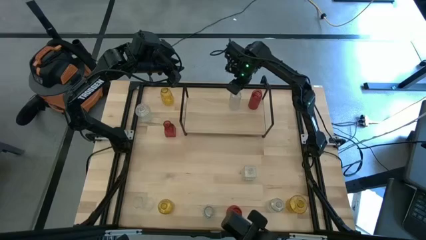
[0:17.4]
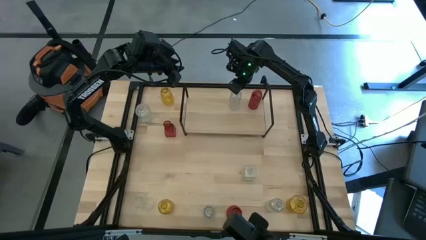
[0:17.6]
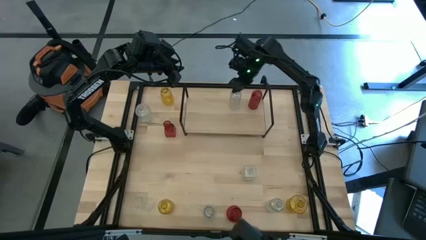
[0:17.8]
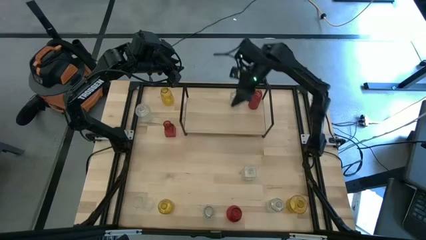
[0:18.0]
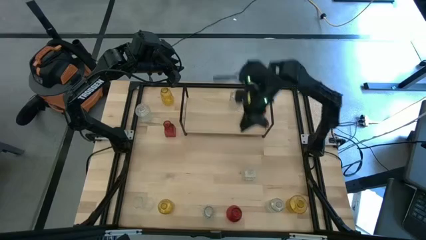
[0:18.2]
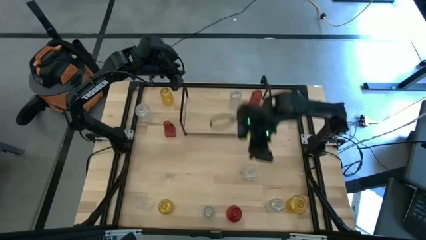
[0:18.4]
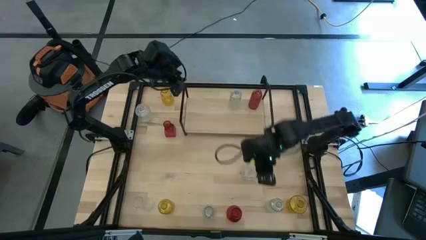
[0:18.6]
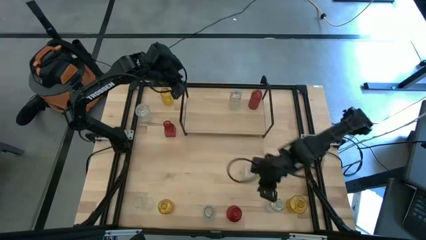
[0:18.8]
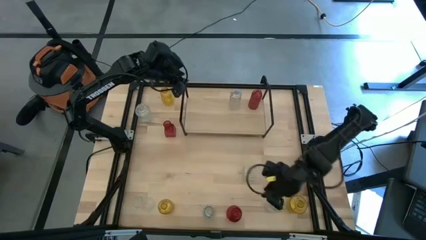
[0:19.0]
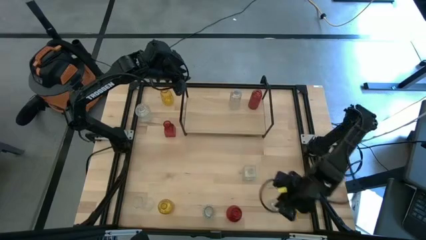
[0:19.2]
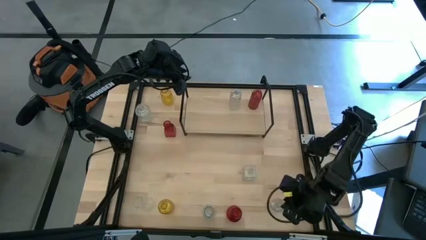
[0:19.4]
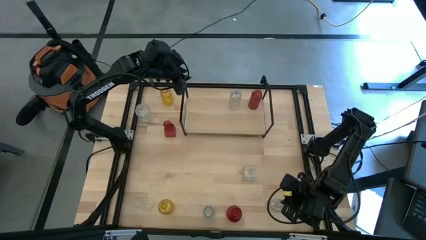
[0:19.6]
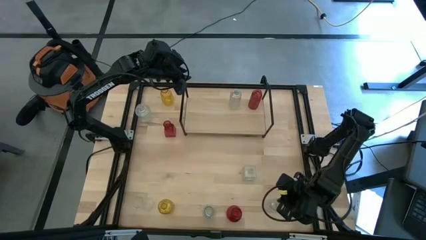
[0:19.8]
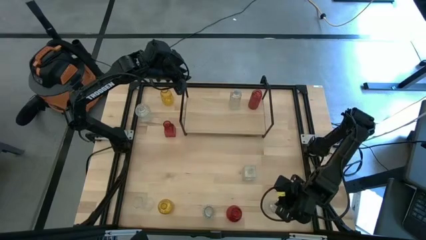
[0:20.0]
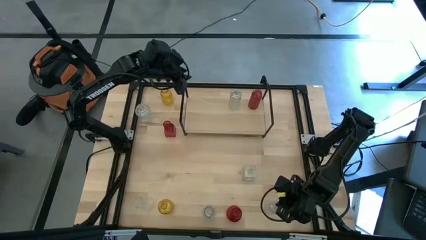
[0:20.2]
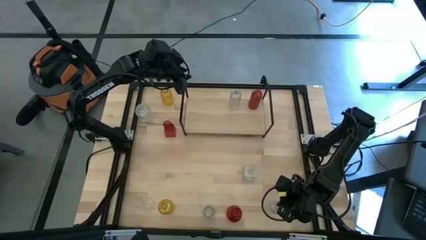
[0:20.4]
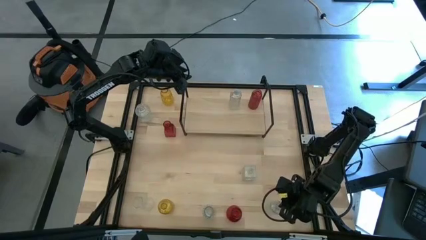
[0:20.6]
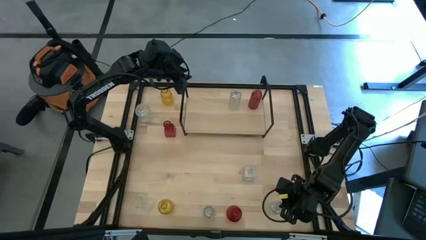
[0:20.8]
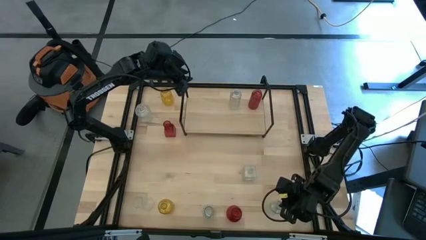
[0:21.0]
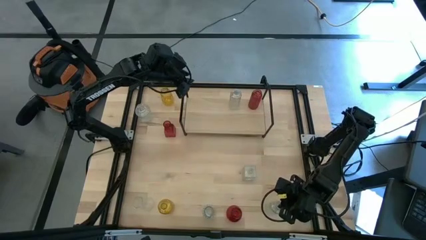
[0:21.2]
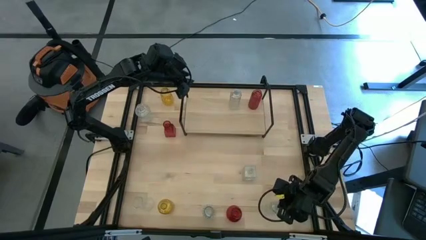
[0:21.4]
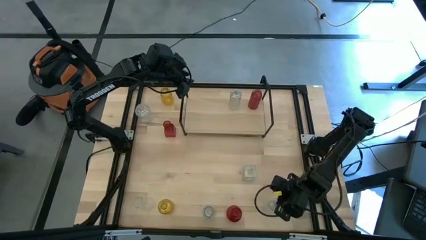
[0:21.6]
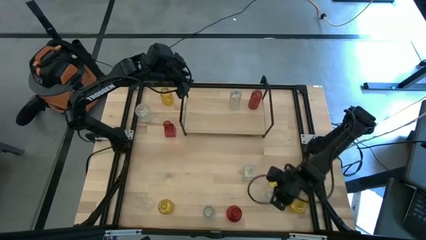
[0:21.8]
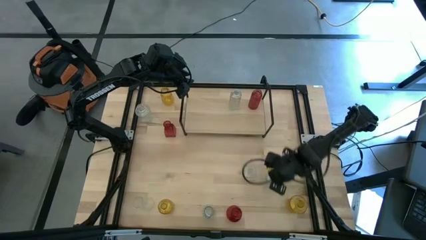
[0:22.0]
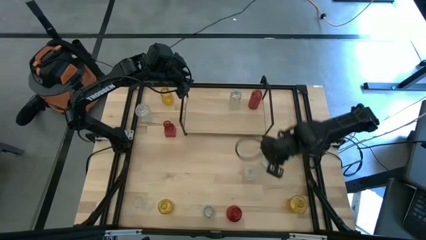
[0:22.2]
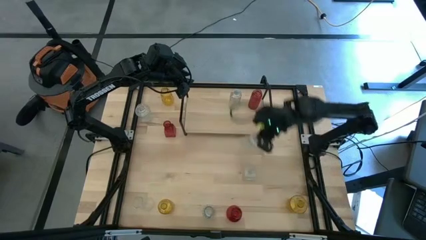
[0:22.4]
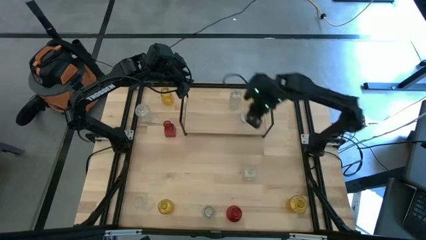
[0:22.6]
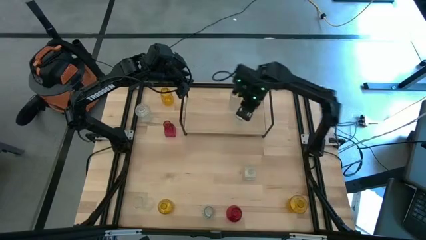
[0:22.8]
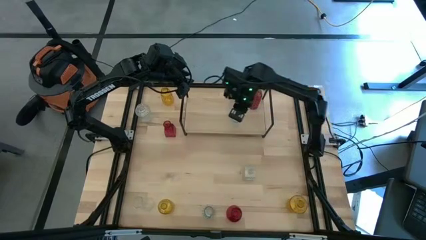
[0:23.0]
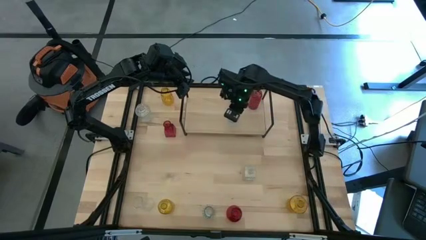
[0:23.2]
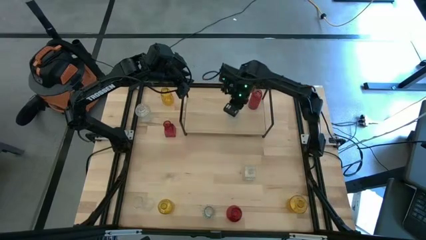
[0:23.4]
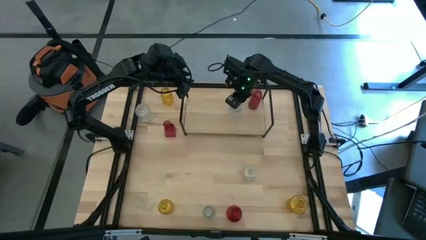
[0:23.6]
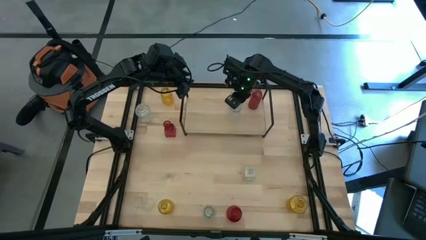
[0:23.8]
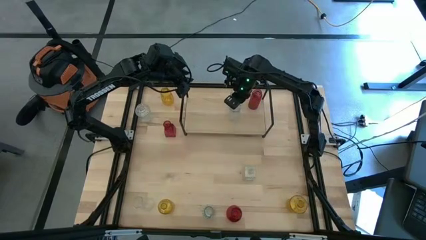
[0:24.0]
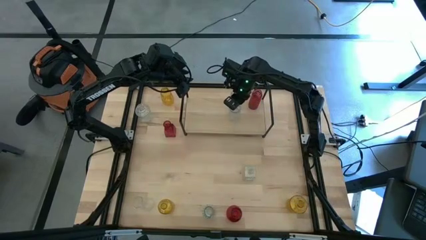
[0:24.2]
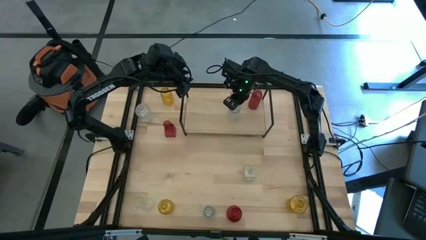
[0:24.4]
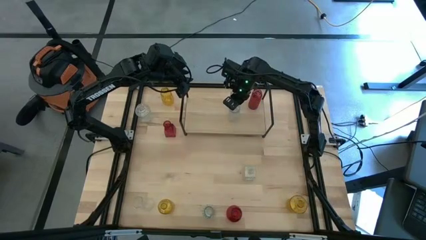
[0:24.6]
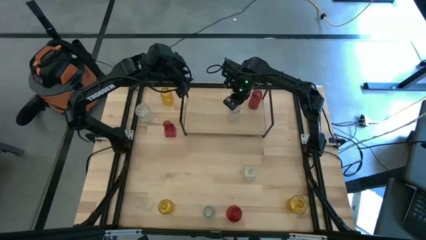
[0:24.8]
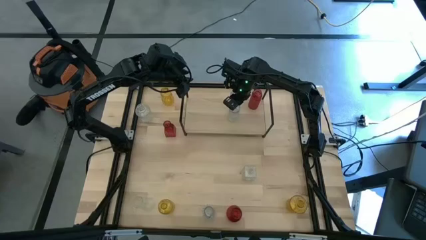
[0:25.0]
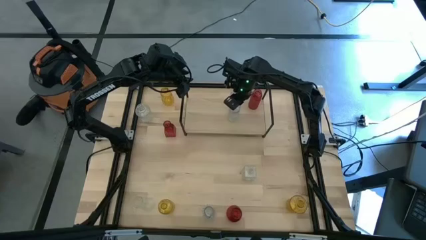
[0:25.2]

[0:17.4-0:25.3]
Task: sort vases onto shelf
Put the transparent vase on the shelf aligned with the other transparent vase

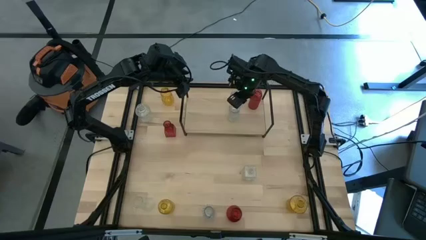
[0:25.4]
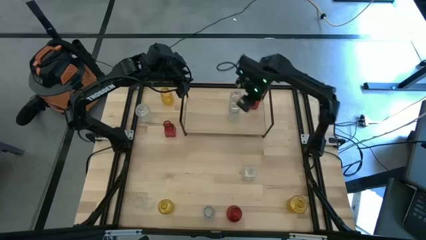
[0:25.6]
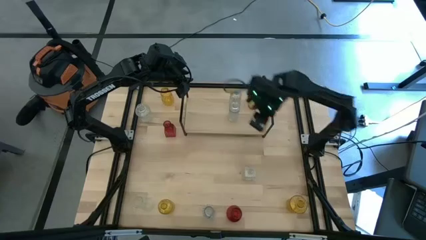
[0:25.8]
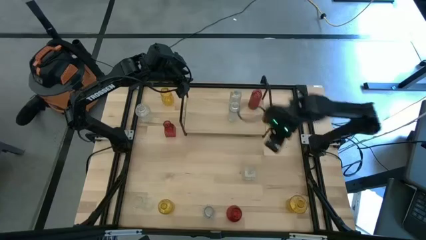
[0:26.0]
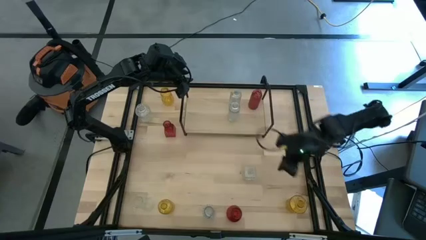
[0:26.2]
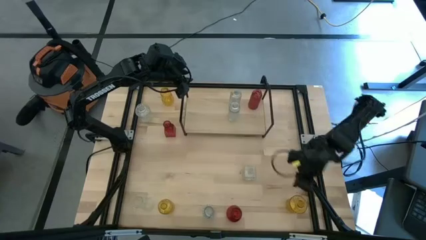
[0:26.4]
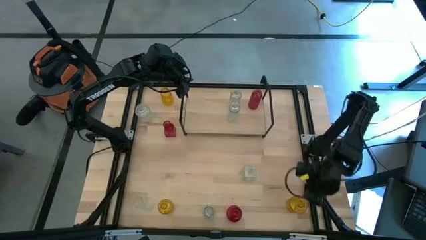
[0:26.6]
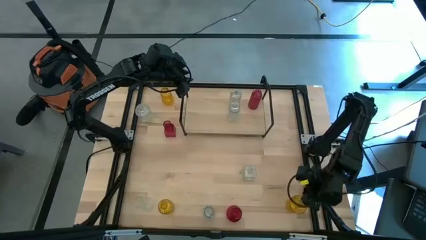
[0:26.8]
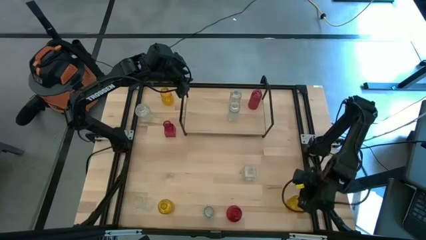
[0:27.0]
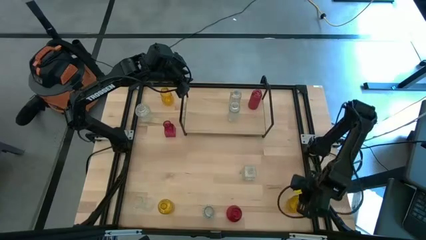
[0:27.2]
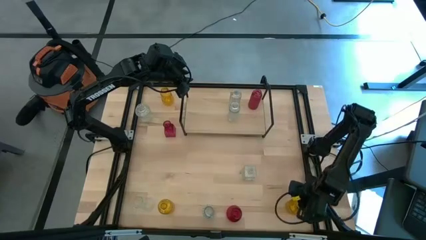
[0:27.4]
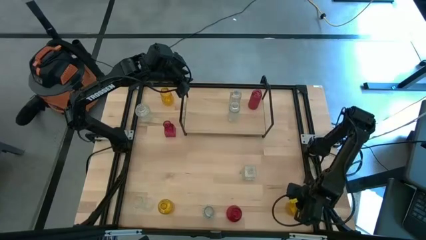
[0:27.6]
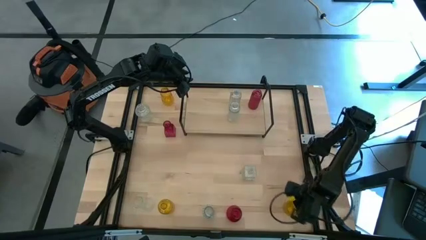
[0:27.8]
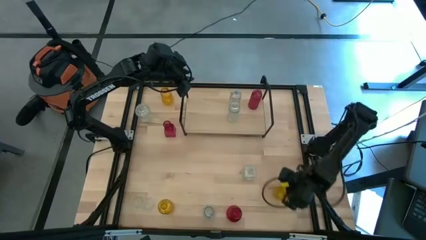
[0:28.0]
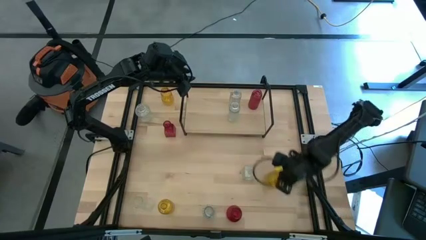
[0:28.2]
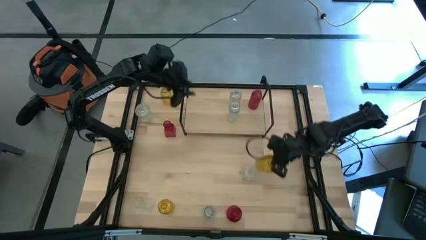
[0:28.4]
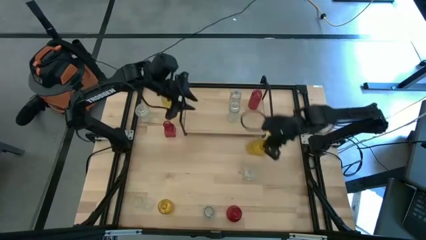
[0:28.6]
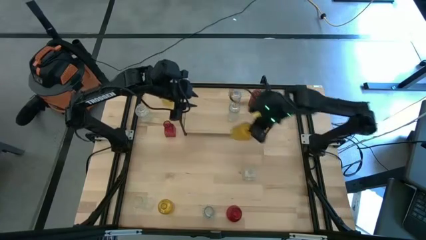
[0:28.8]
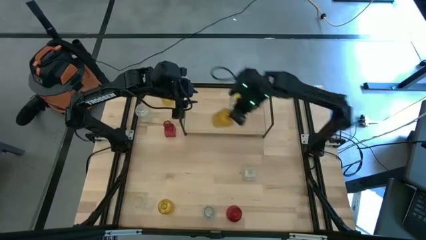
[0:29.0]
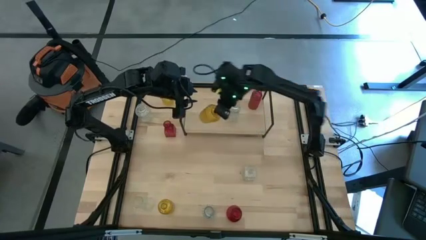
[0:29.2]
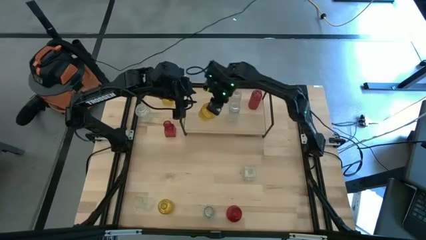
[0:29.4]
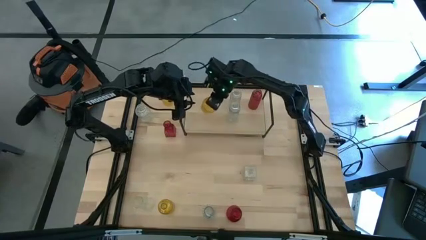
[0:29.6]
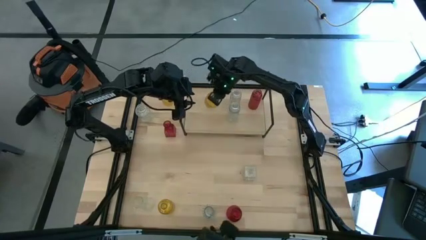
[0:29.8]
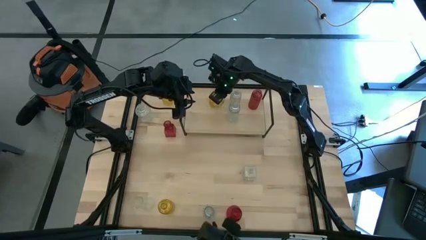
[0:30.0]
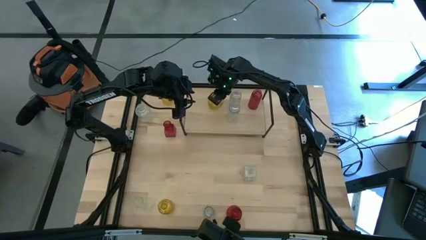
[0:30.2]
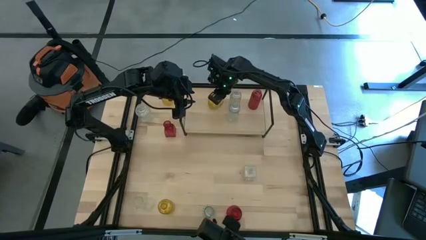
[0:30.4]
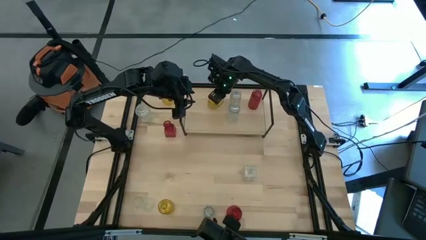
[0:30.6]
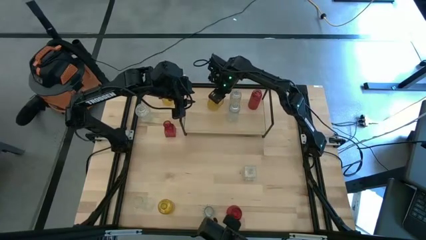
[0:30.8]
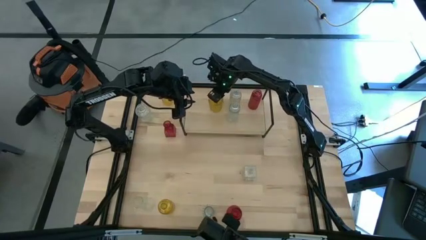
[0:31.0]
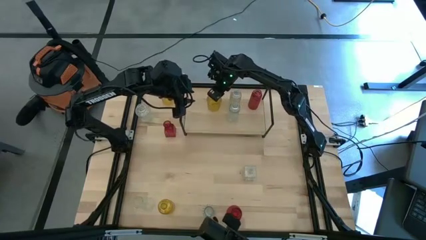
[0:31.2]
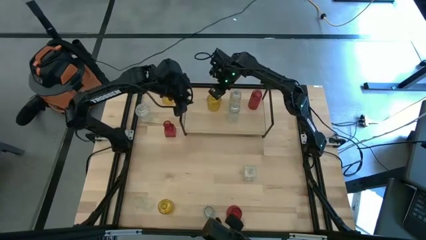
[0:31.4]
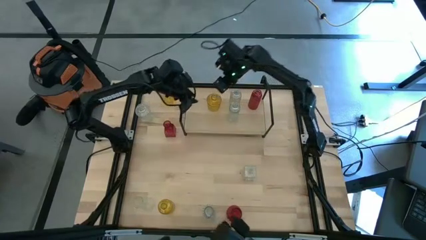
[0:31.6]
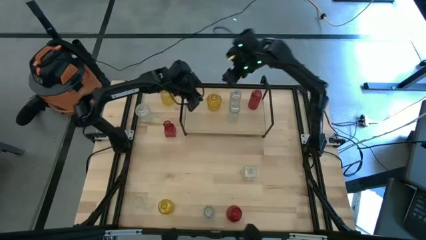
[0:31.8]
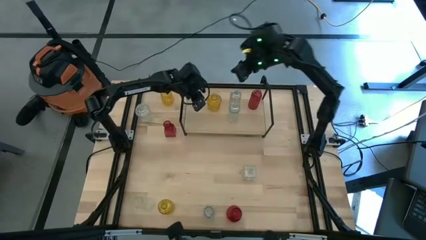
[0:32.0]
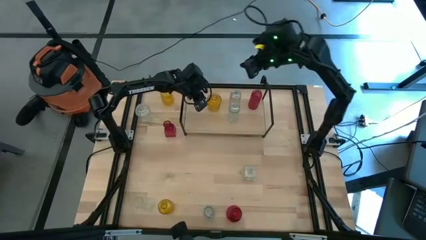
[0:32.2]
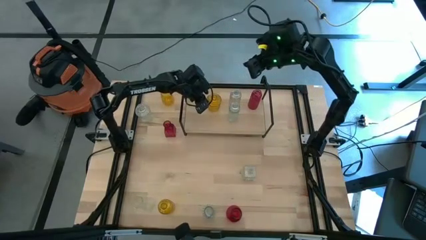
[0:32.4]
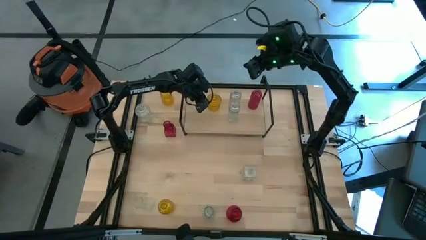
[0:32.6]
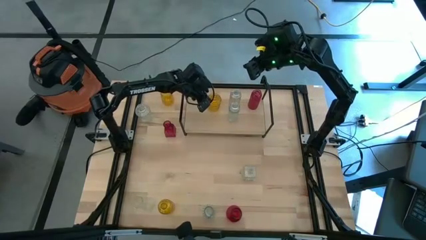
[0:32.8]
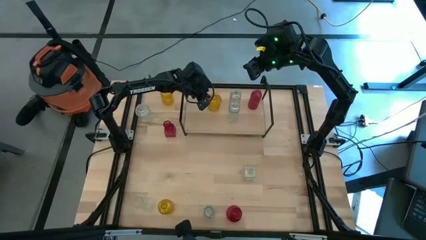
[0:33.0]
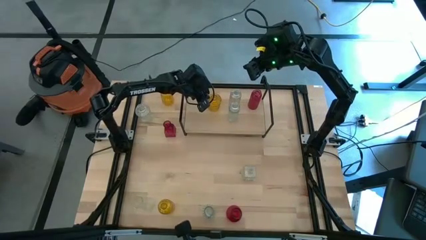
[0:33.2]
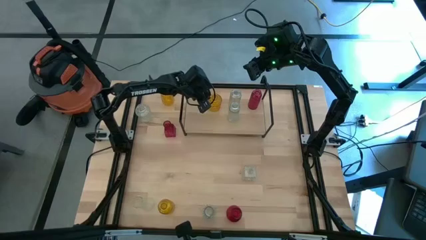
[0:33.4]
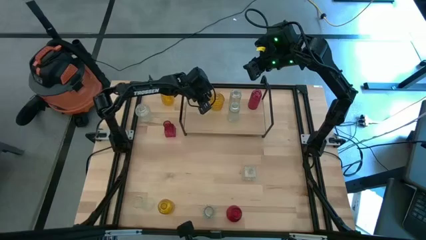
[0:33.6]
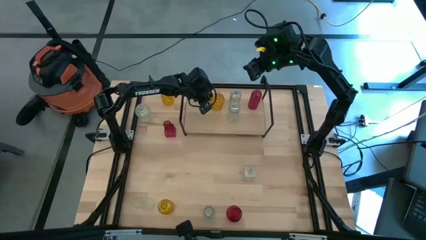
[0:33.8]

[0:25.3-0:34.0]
Put the yellow vase on the shelf

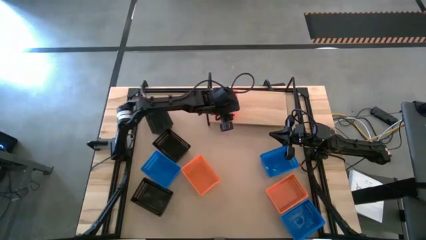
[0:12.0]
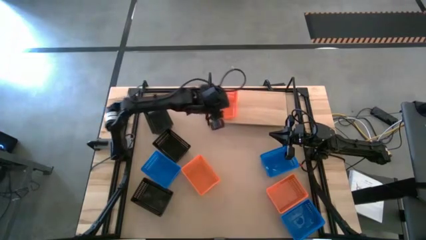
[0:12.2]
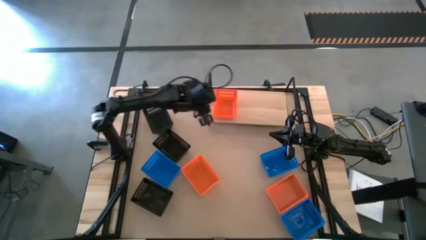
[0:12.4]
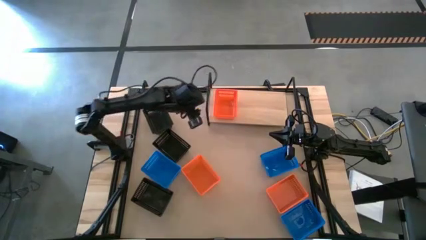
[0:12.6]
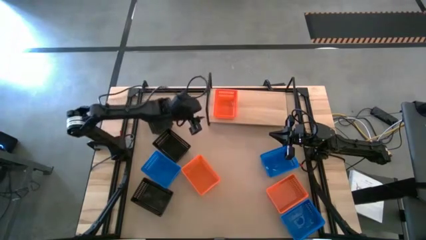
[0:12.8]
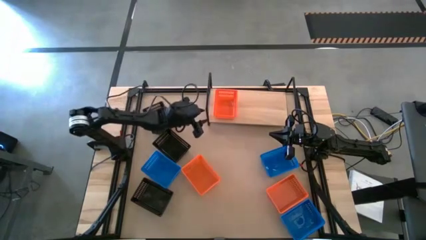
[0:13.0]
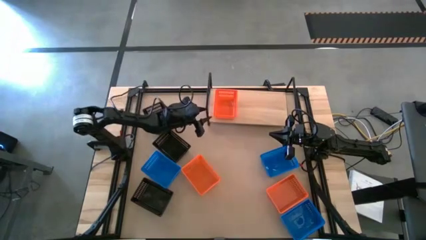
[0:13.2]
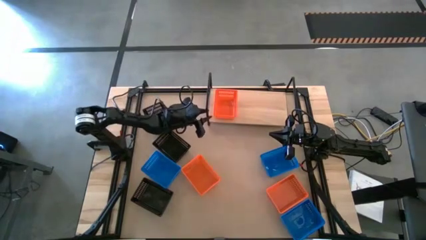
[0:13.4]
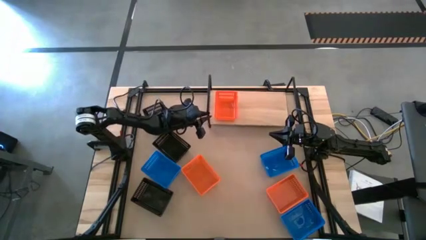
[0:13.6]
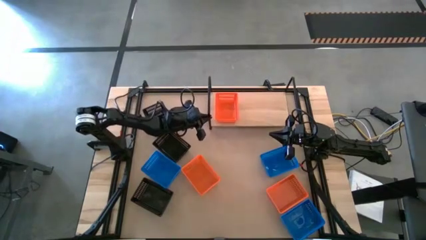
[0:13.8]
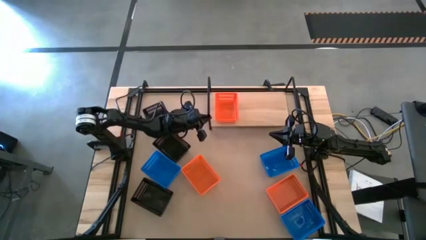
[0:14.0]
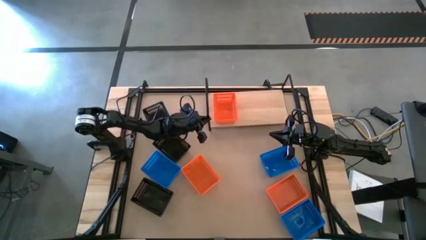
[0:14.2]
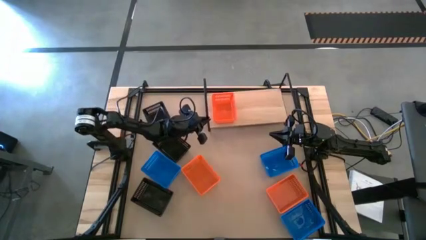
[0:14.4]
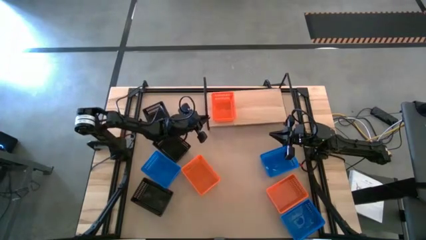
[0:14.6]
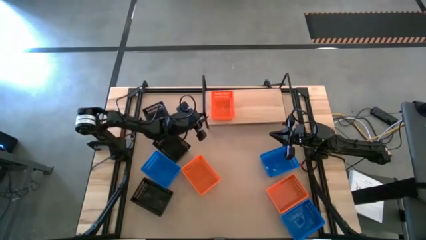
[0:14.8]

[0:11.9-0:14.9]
Task: Stack baskets on shelf by color
Adjust the shelf
